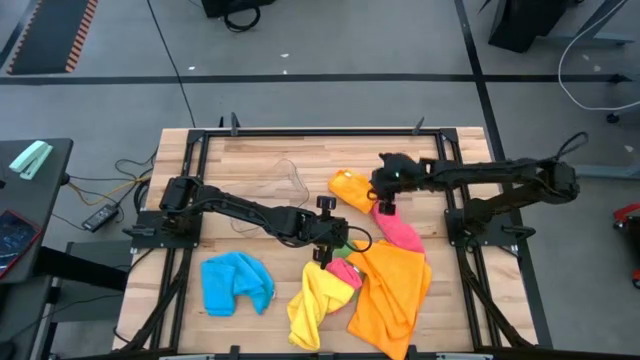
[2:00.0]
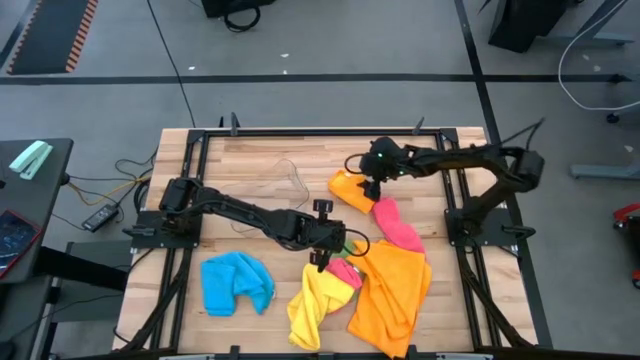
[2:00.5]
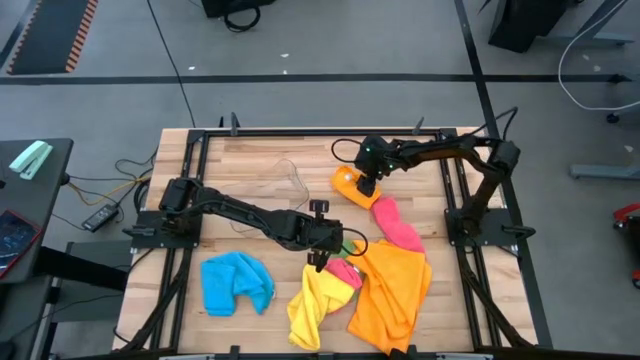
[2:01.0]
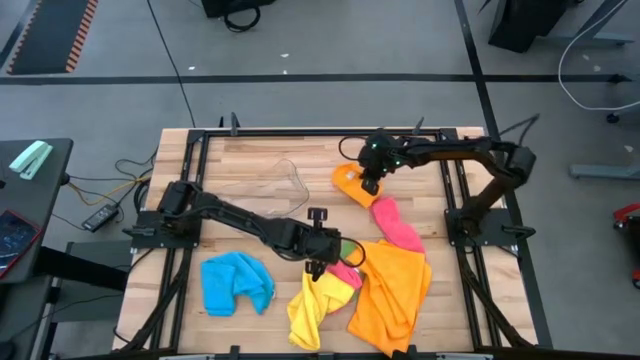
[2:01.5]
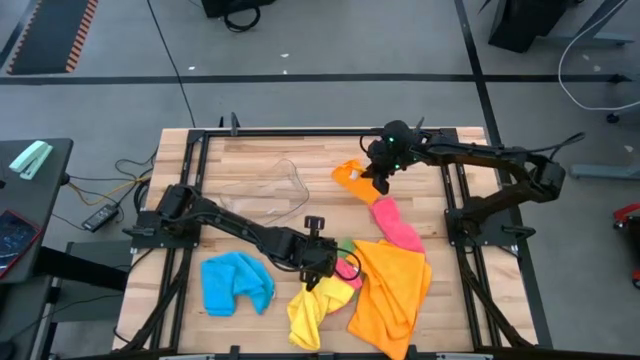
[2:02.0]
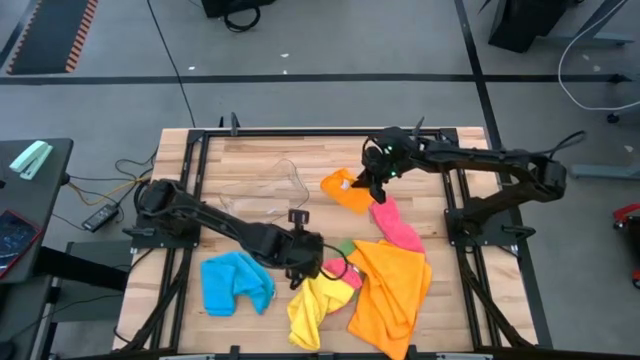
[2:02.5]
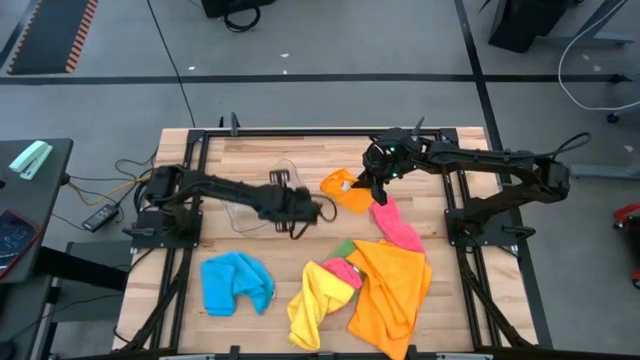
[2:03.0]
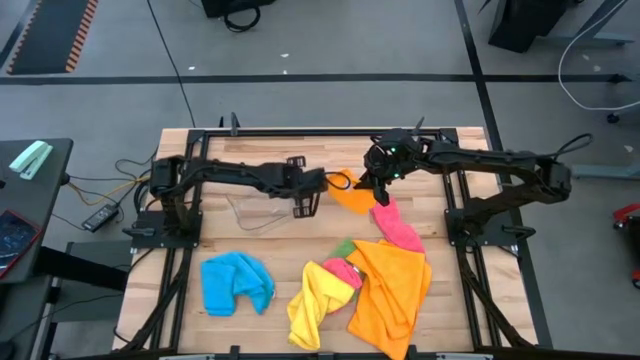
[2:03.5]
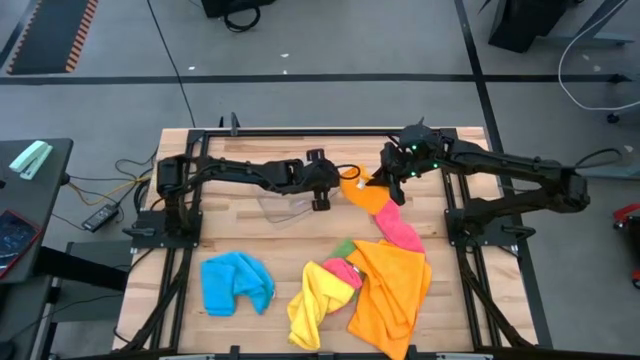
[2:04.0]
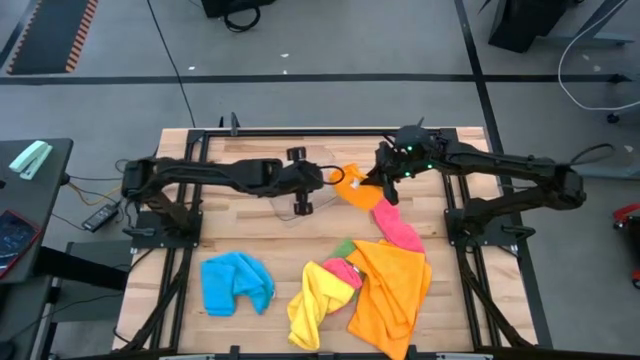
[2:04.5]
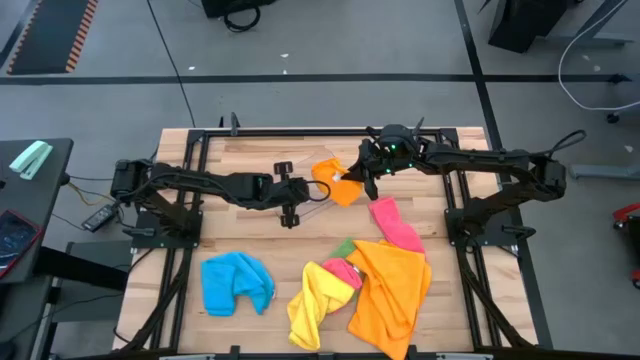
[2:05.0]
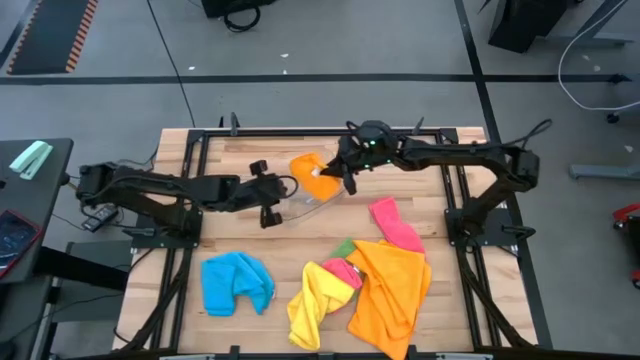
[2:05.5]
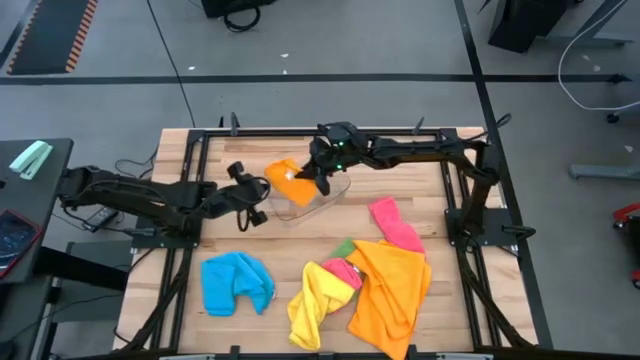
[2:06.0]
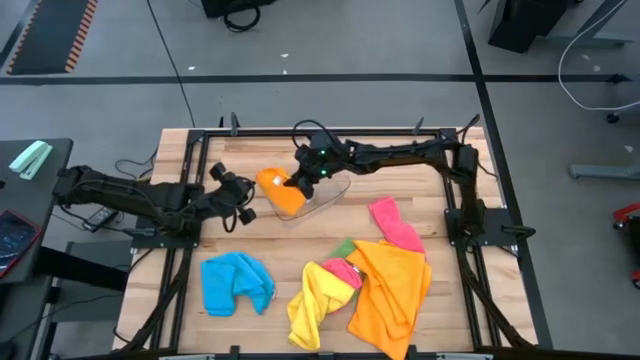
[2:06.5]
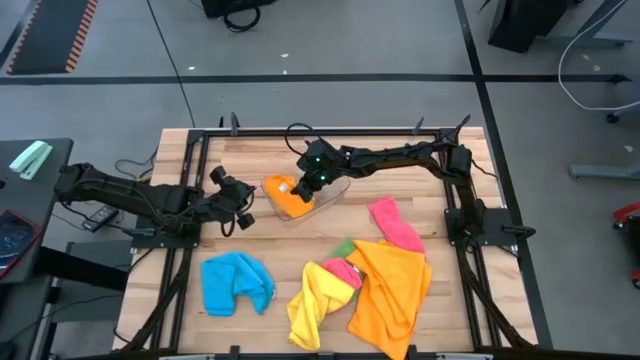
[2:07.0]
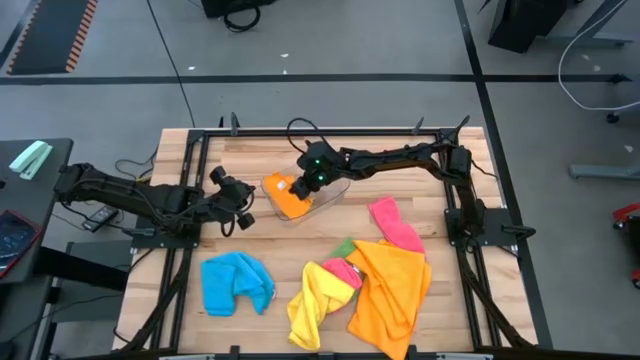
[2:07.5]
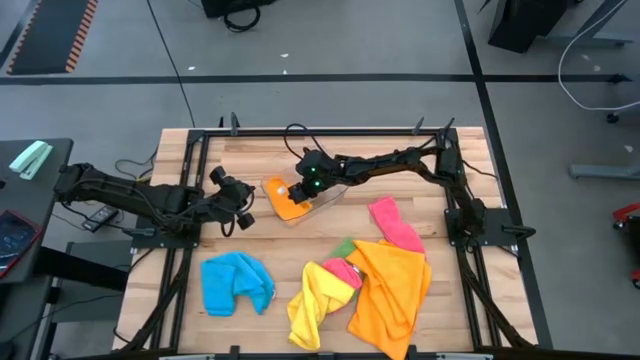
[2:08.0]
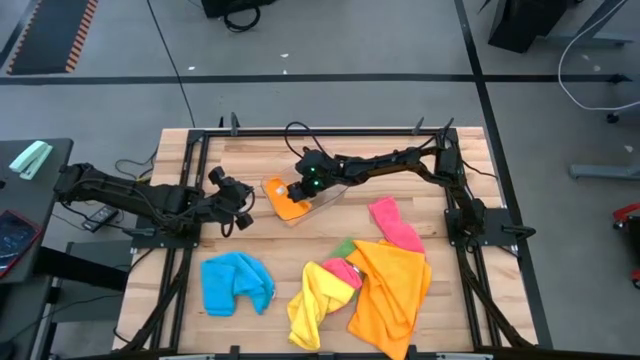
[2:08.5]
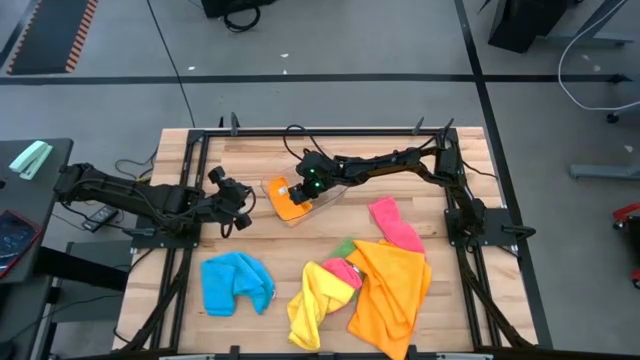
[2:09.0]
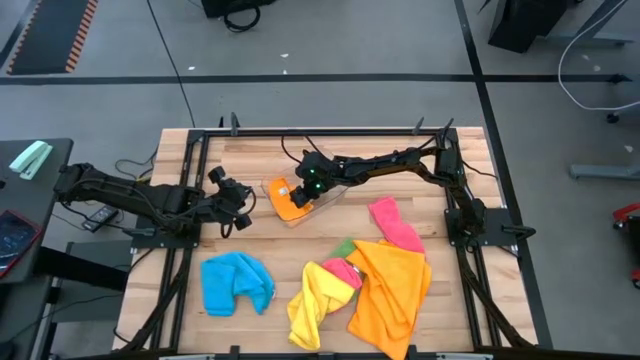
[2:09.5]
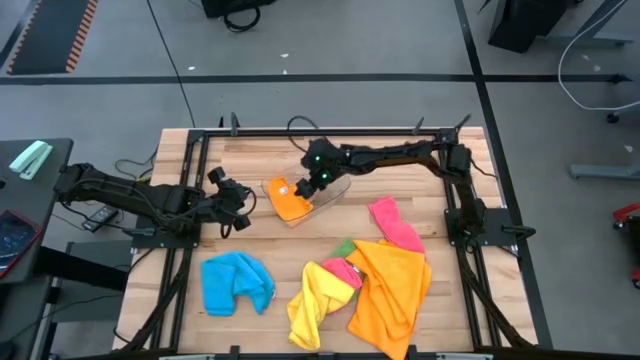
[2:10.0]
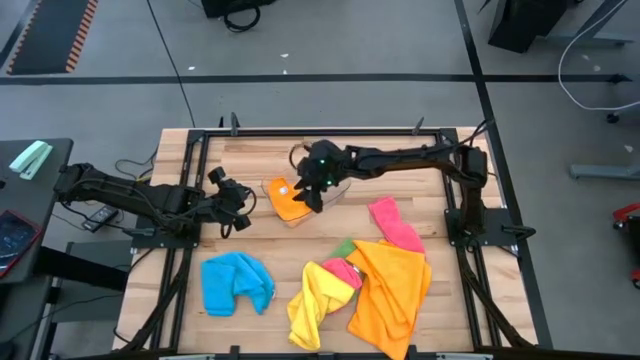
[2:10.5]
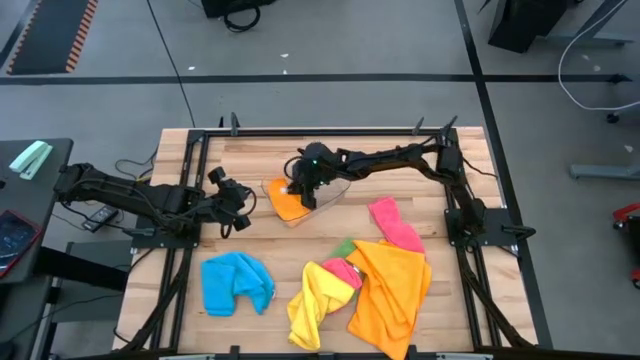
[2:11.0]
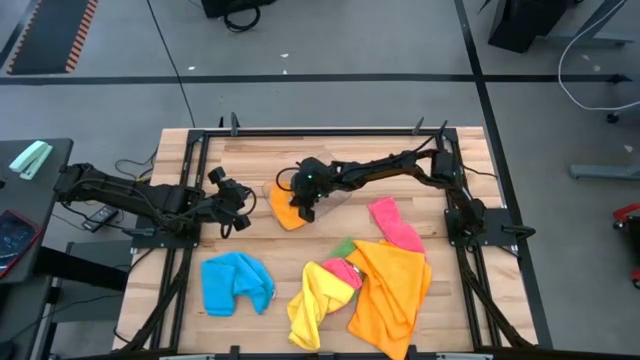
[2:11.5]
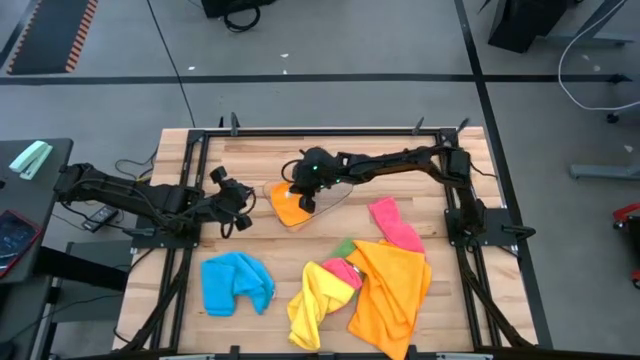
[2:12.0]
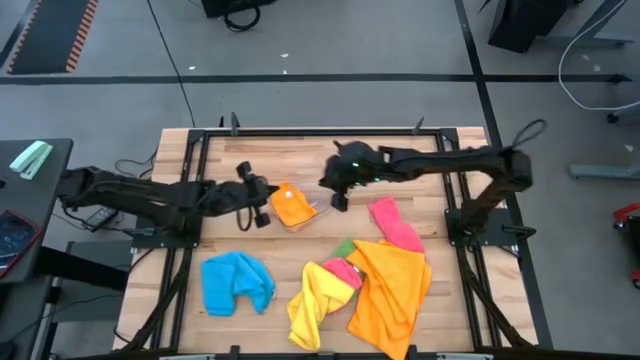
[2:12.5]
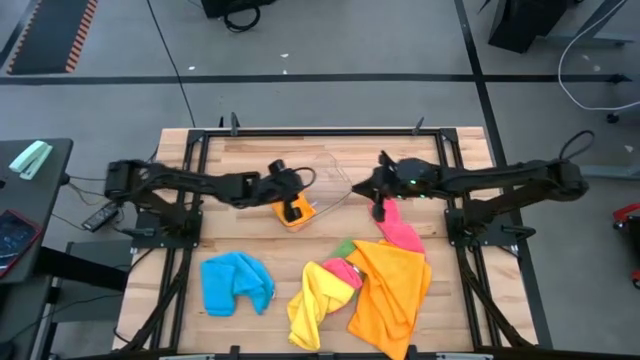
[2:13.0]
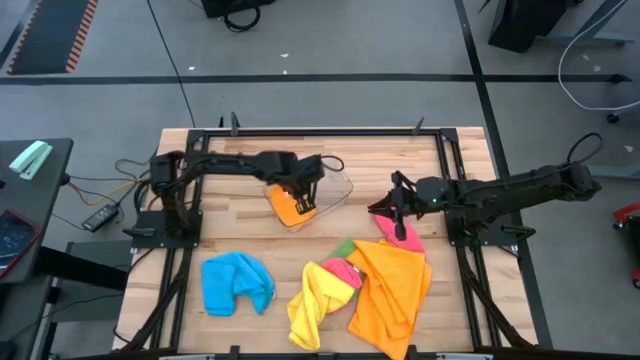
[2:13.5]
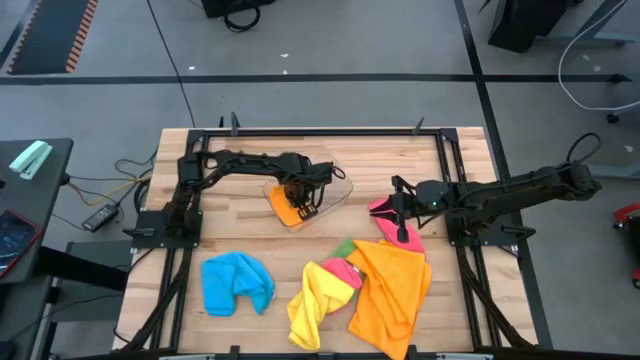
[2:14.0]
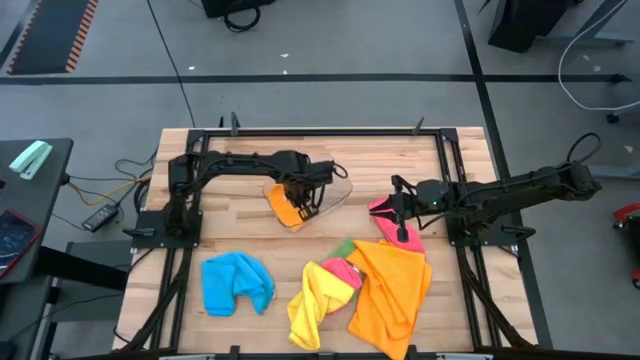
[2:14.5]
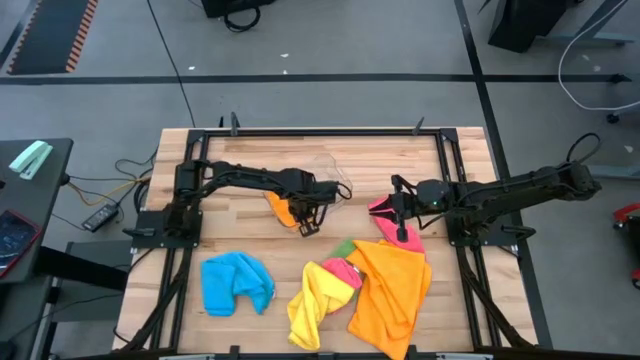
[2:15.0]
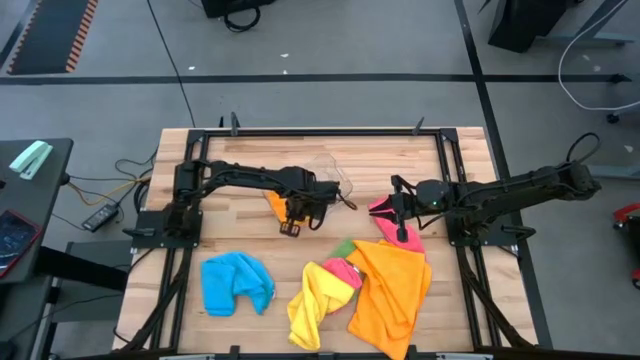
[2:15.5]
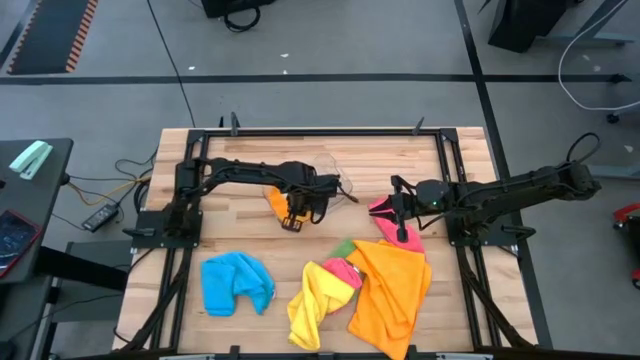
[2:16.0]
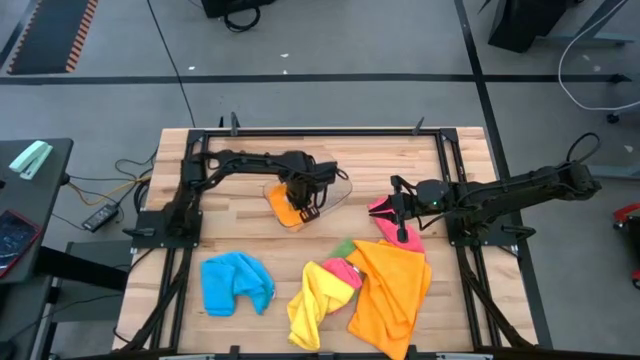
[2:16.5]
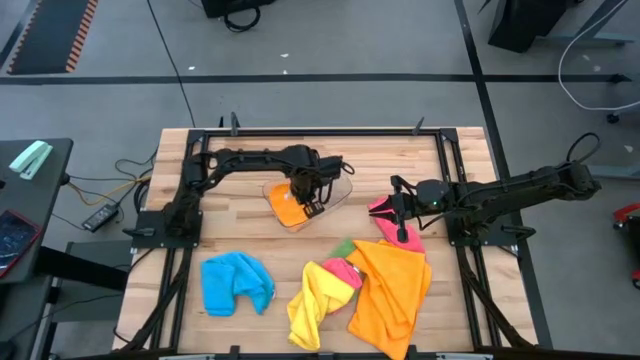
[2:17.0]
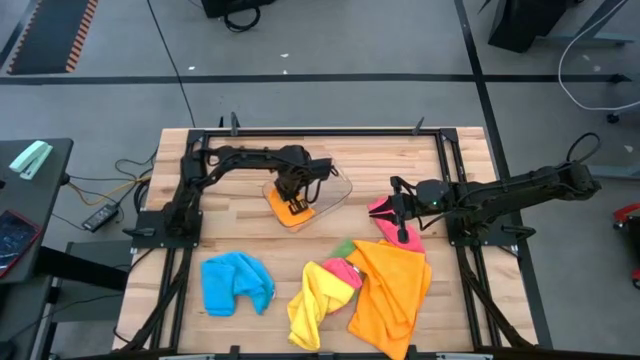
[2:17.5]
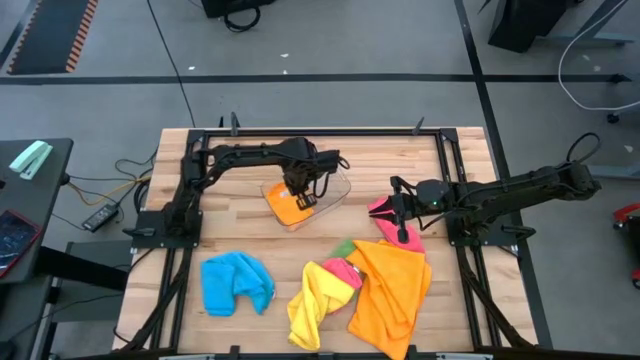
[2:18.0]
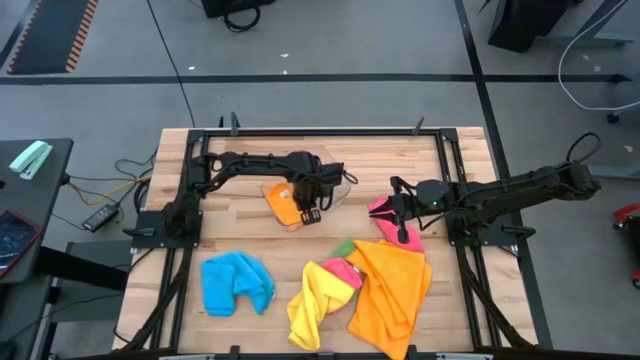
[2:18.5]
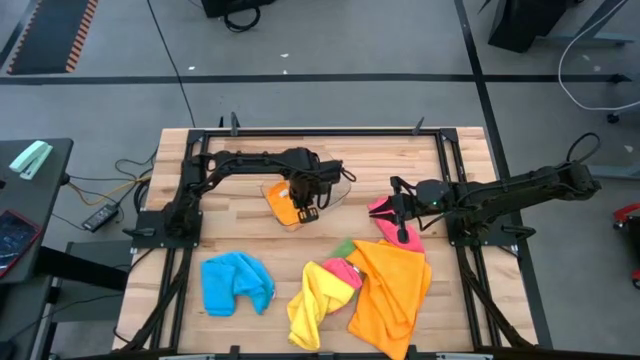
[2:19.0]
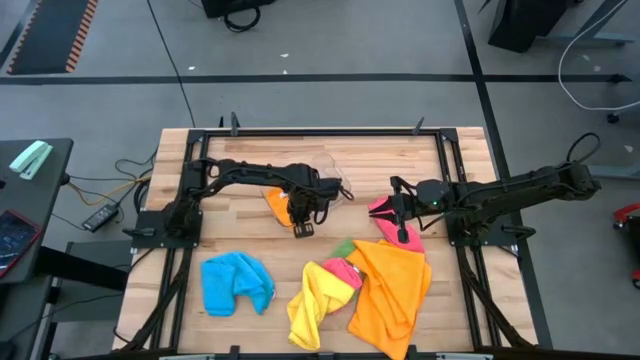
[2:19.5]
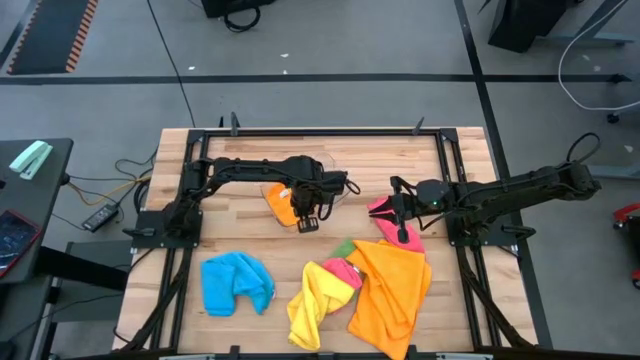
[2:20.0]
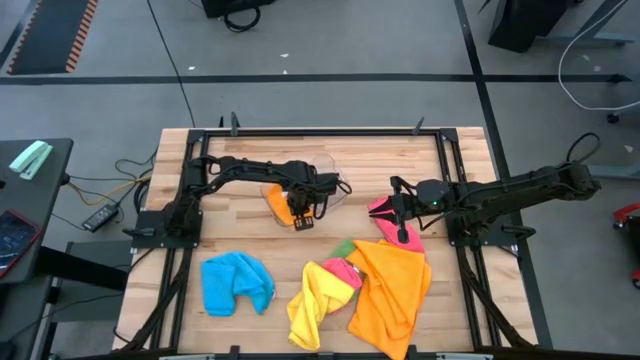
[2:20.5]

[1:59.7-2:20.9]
Task: Fold microfiber towels
Put the folded orange microfiber towel into the transparent bin
